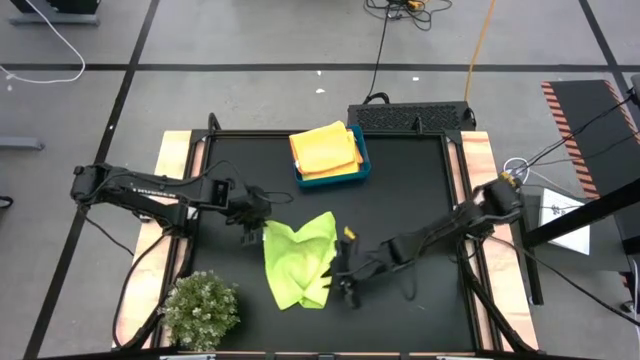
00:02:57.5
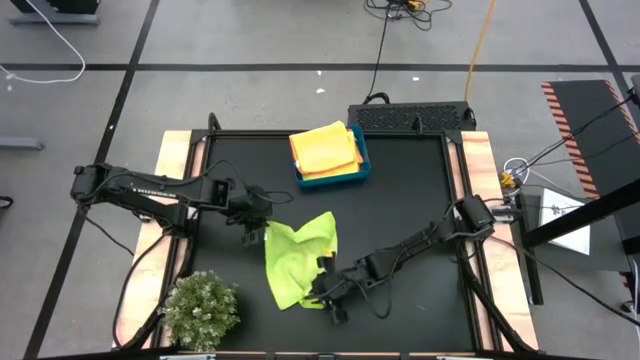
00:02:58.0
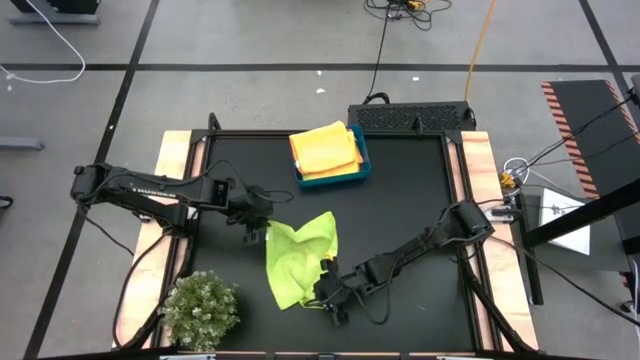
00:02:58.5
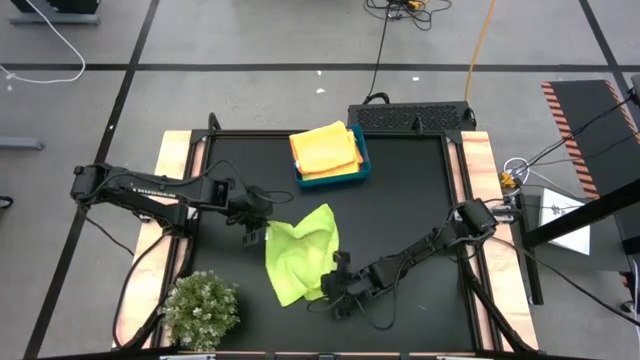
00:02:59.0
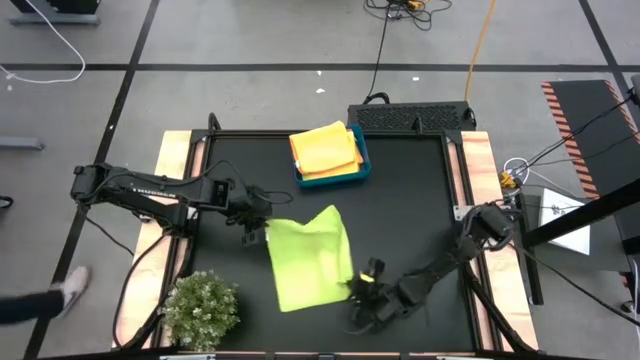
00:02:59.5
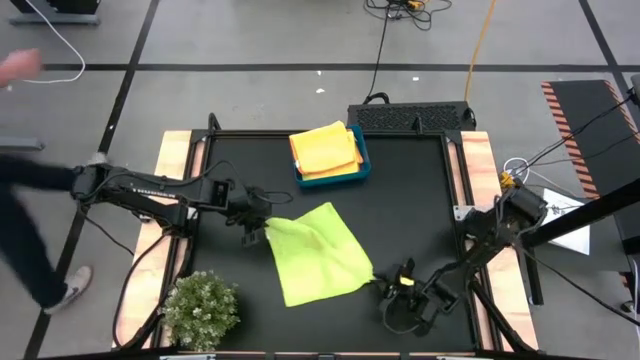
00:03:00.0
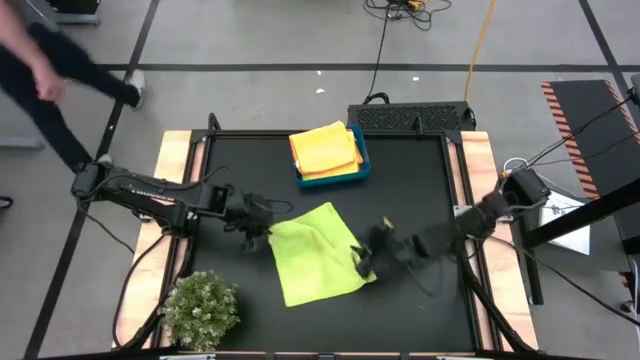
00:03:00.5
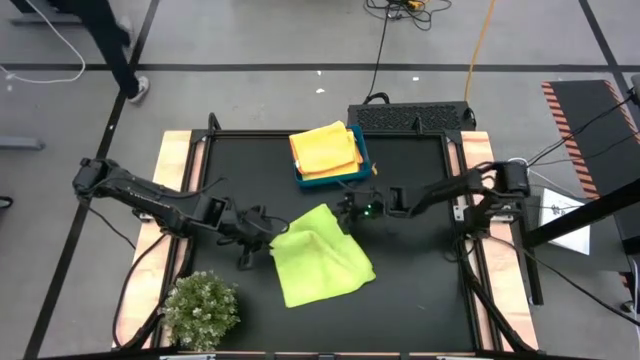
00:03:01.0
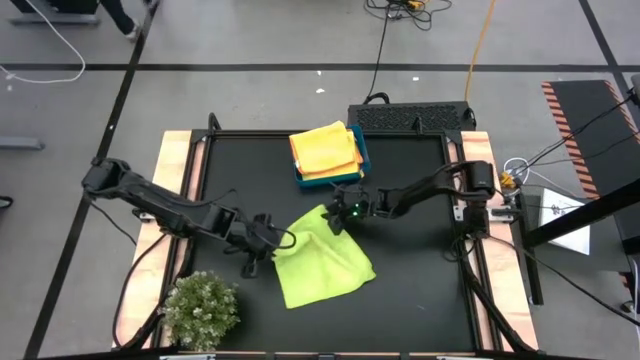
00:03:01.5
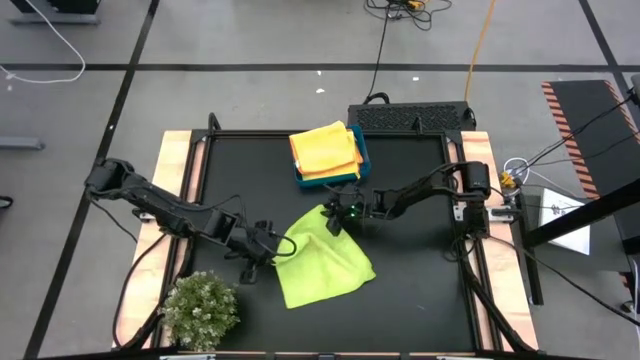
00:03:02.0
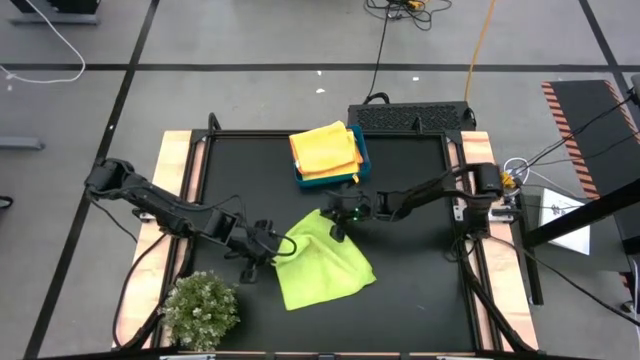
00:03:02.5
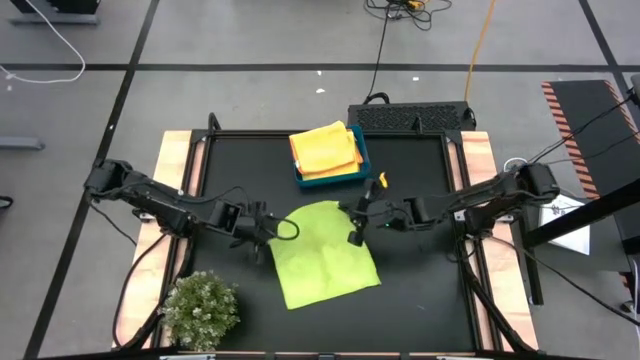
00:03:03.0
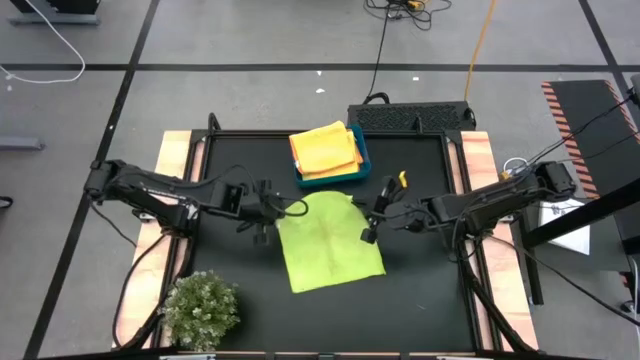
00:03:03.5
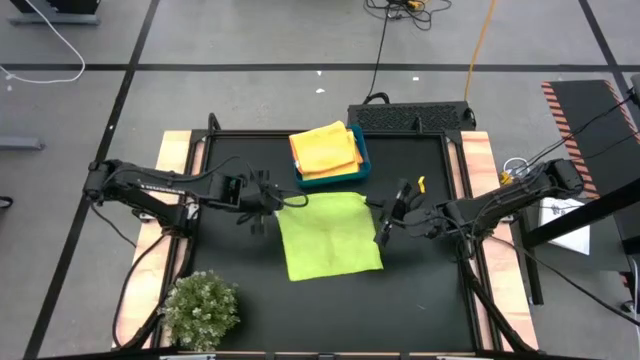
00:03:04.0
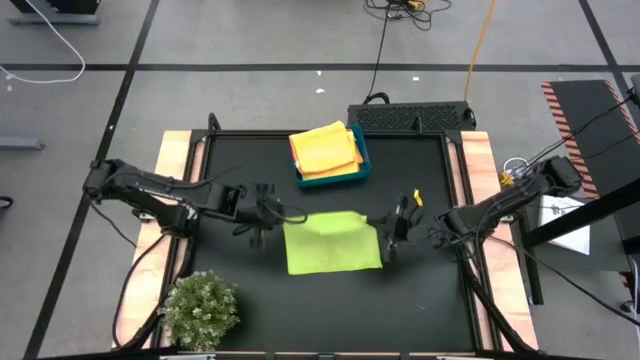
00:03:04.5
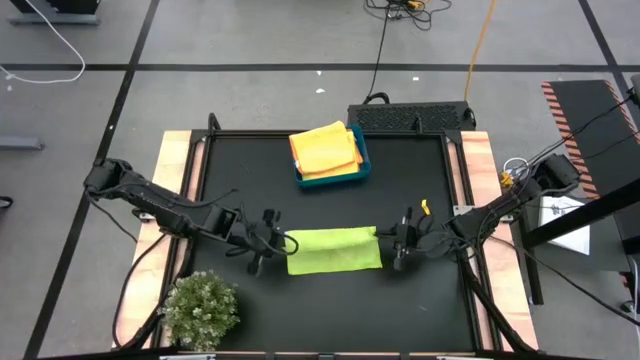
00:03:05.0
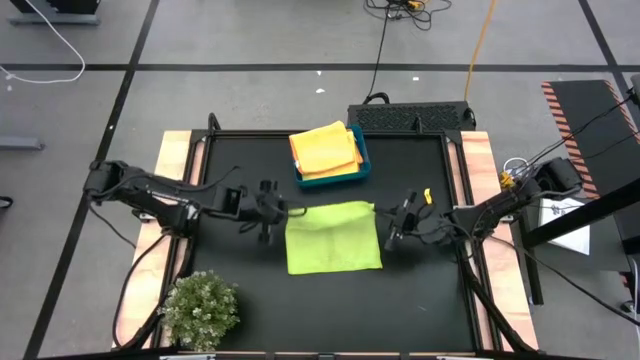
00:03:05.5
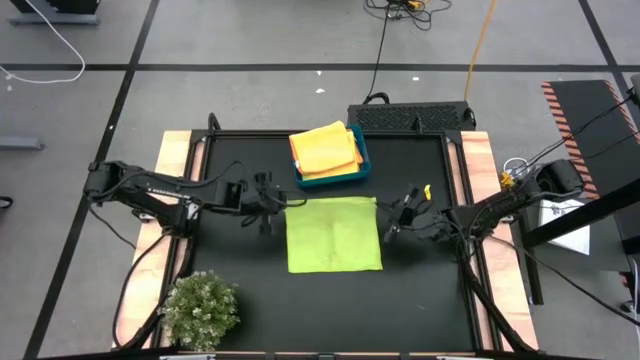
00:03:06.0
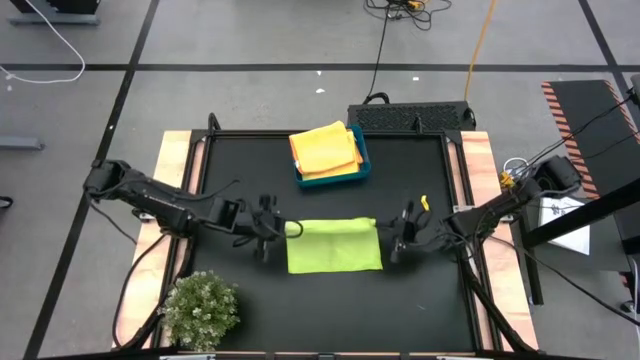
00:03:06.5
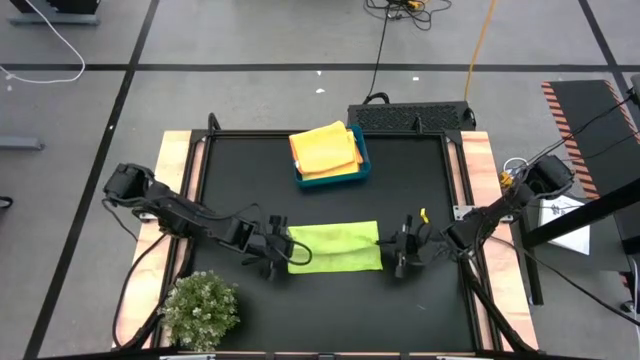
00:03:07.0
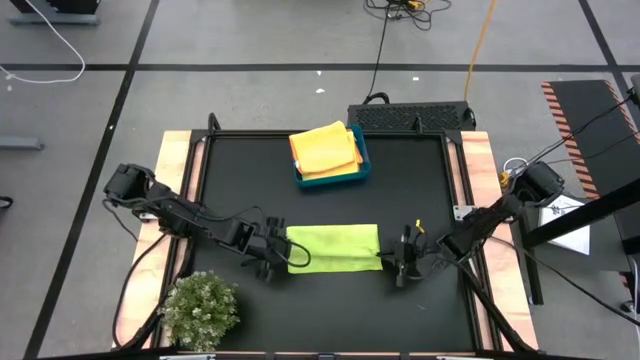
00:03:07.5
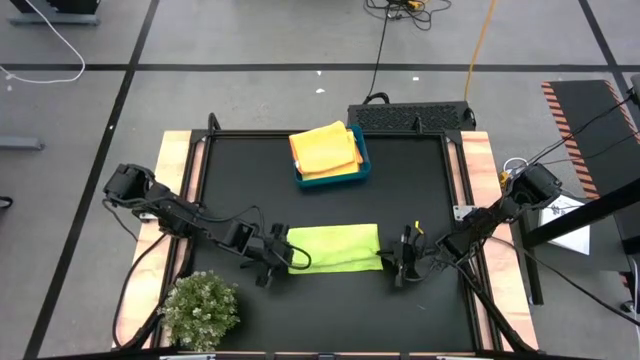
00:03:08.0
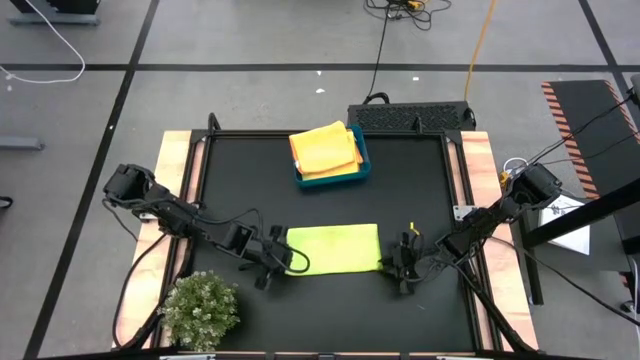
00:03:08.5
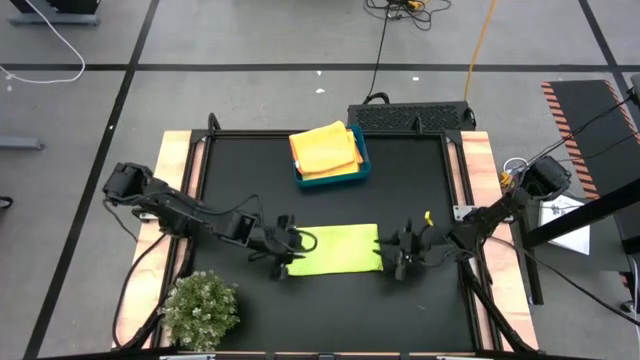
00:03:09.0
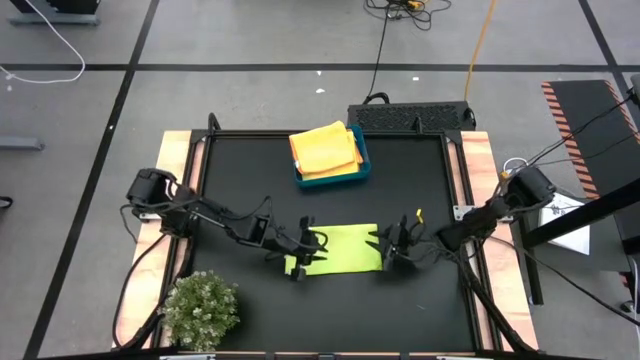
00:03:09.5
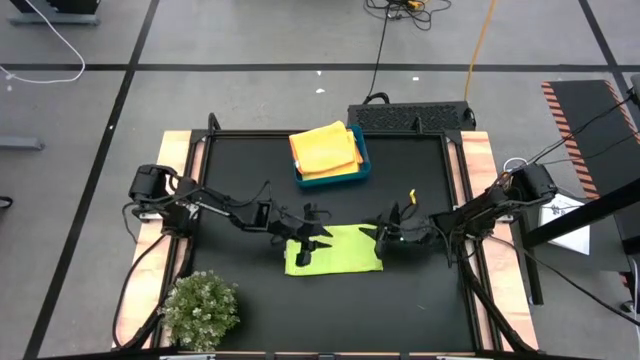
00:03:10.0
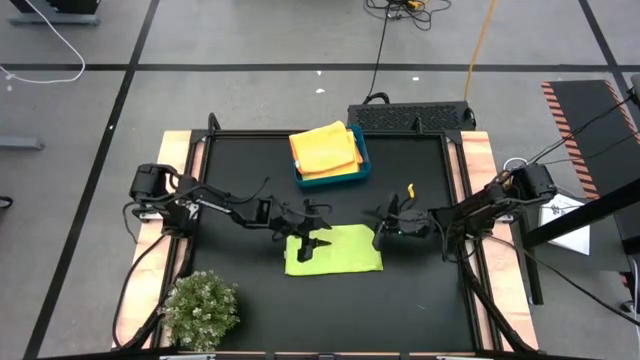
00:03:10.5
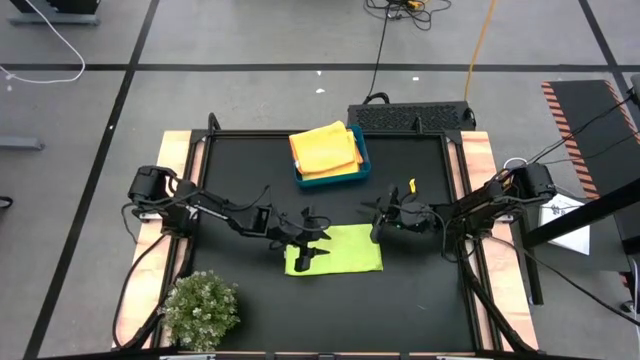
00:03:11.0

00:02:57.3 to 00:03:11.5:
Task: Fold microfiber towels
Fold the green microfiber towel

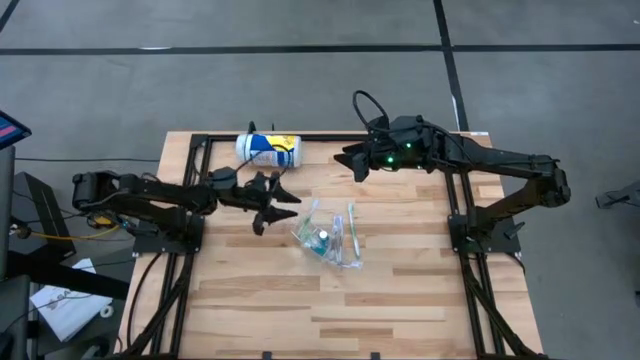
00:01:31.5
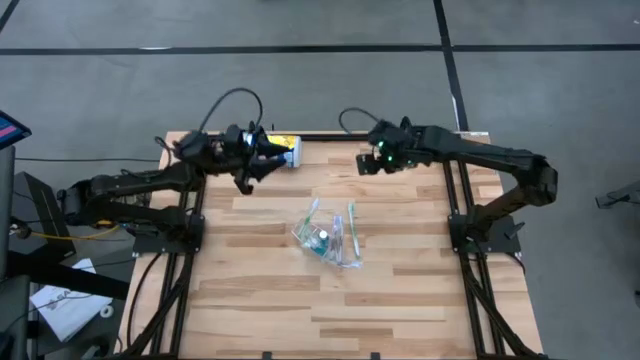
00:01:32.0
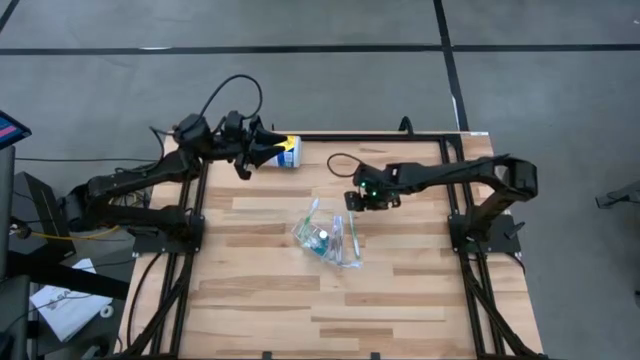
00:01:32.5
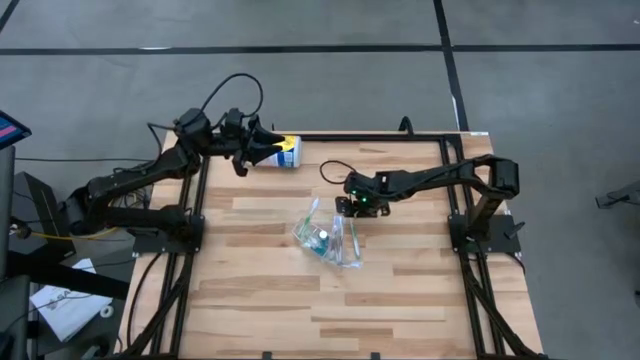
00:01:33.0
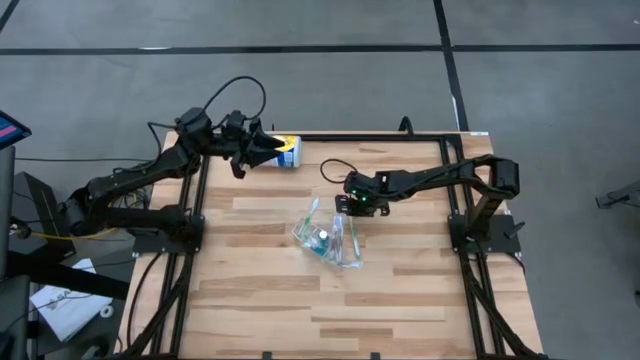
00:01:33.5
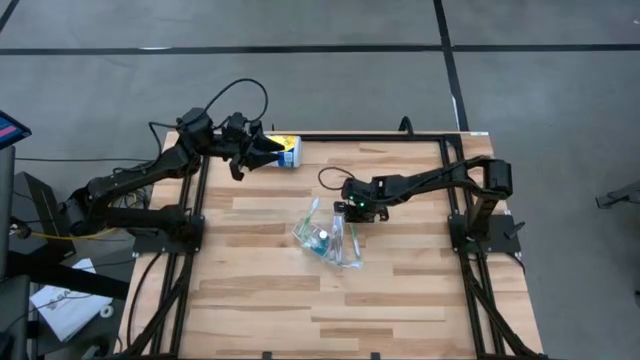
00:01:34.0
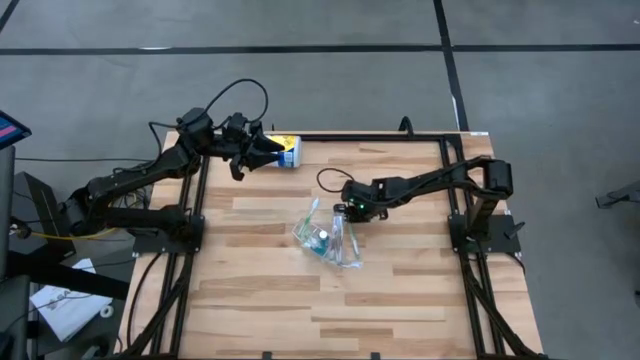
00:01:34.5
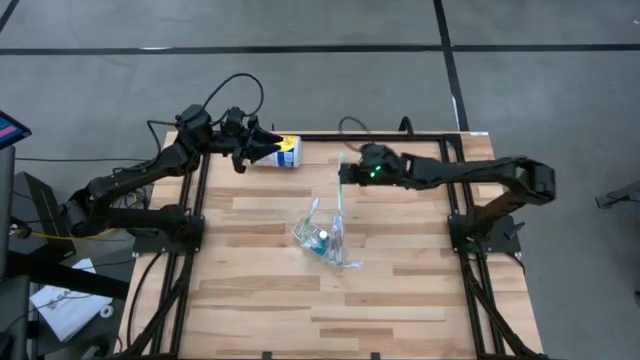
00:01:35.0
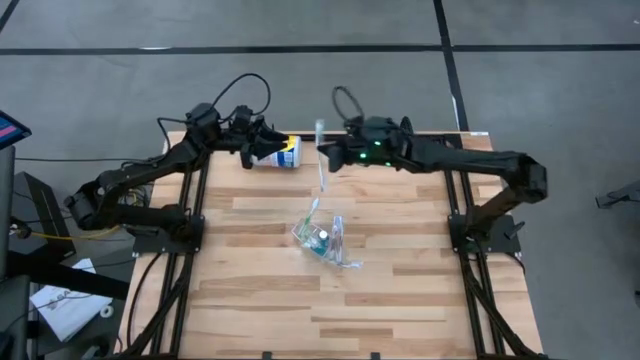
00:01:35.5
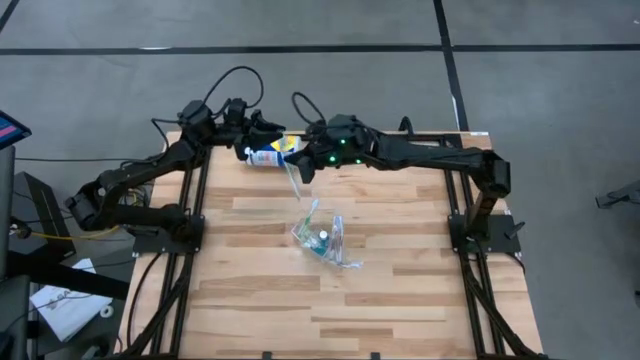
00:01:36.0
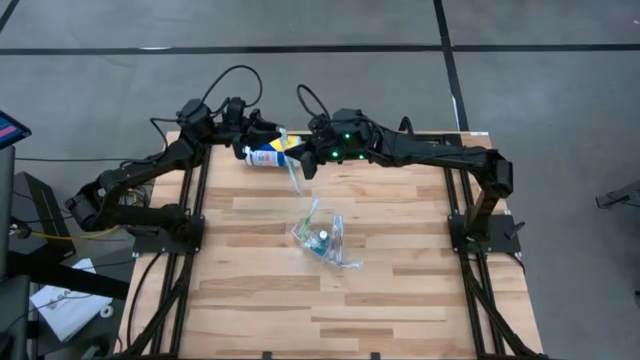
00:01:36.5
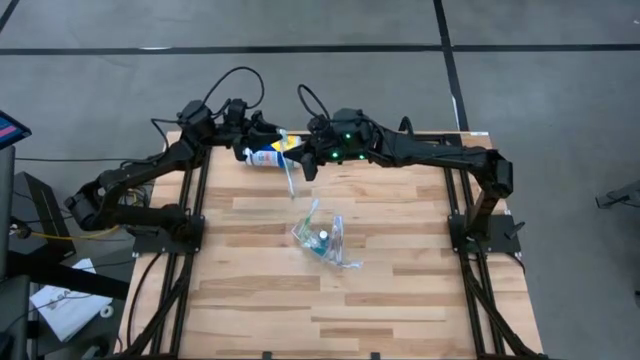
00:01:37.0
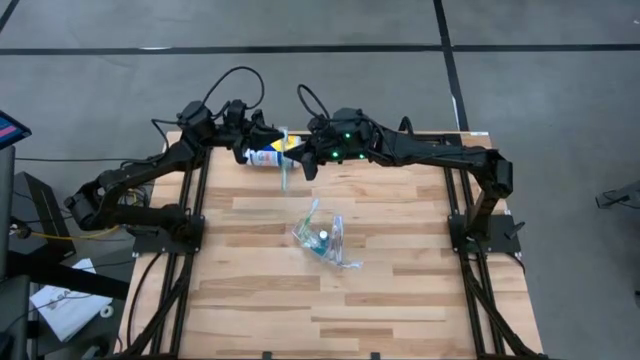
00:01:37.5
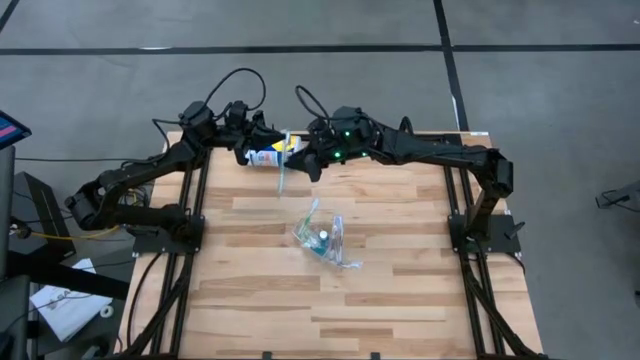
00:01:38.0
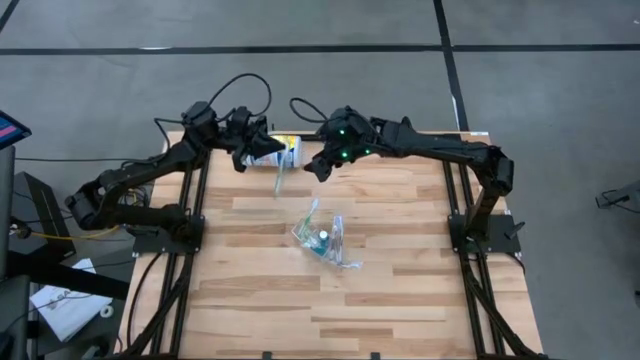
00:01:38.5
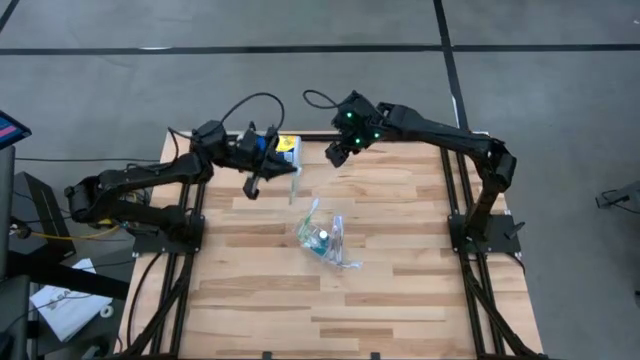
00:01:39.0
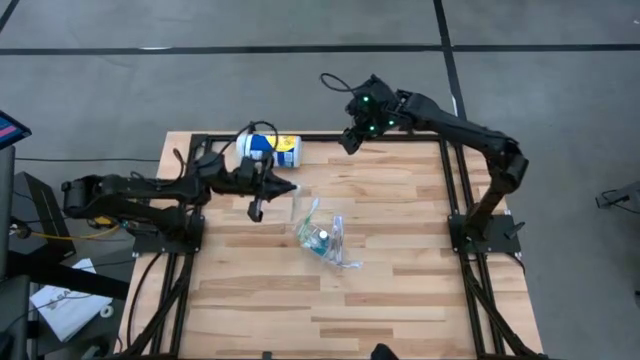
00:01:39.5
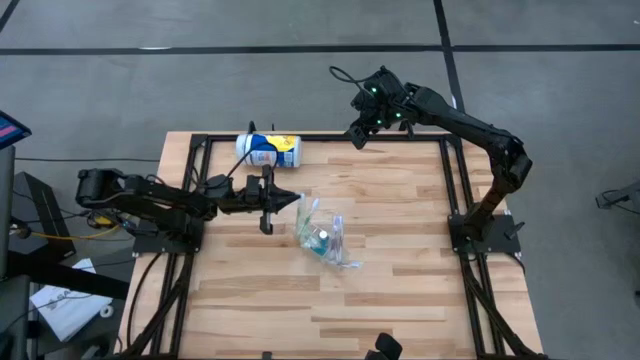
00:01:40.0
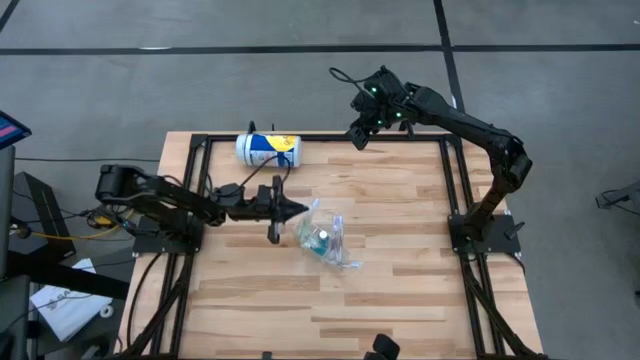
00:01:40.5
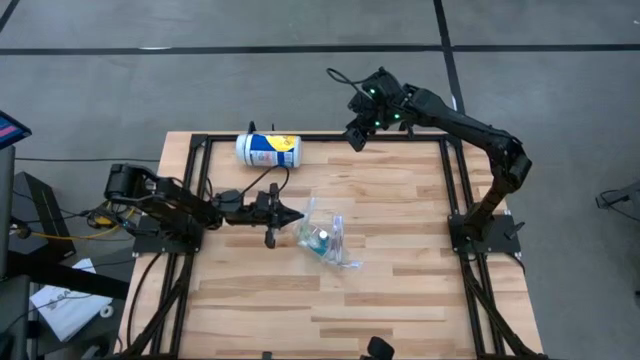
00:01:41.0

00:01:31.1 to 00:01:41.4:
Task: Pick & Place toothbrushing station
Put the green toothbrush into the left compartment of the transparent organizer
